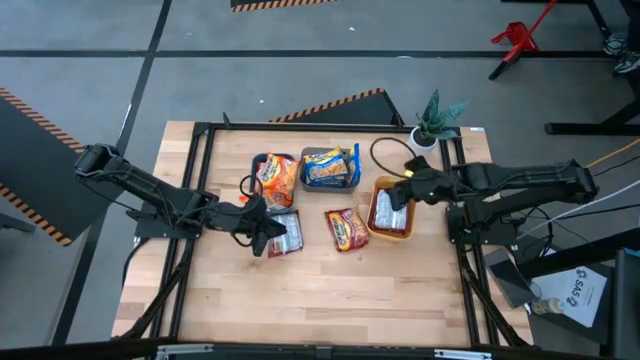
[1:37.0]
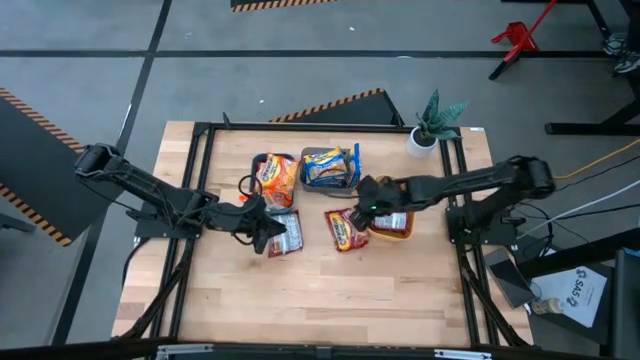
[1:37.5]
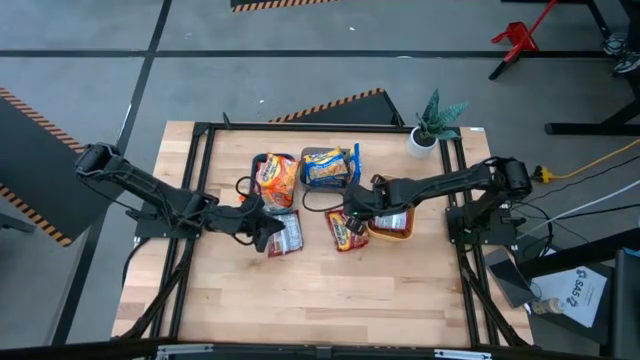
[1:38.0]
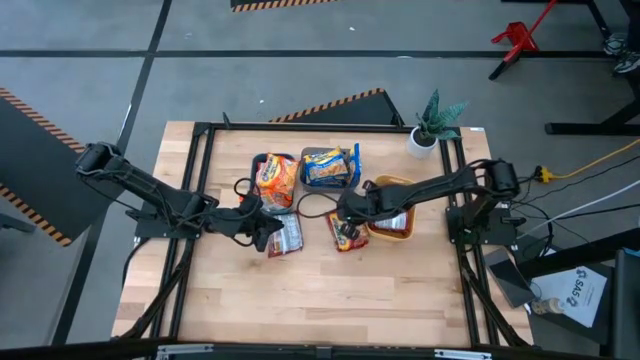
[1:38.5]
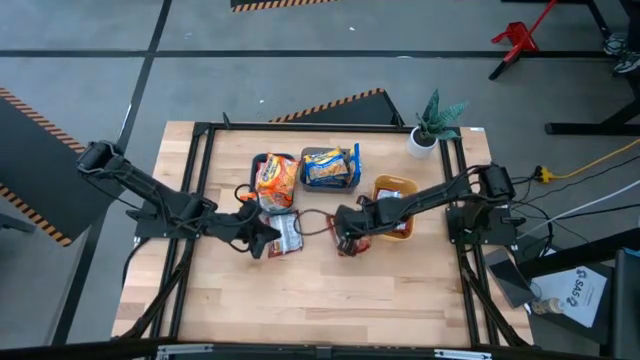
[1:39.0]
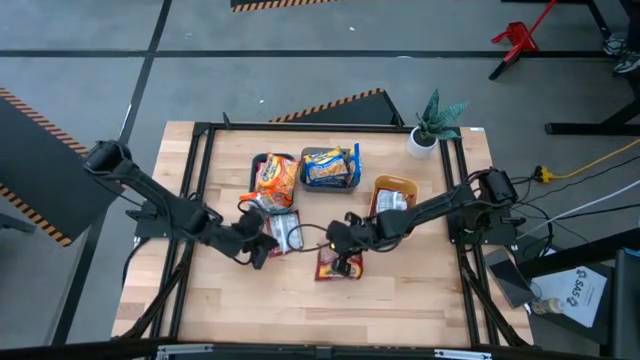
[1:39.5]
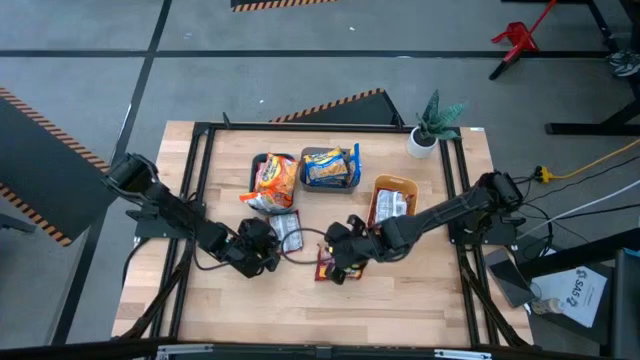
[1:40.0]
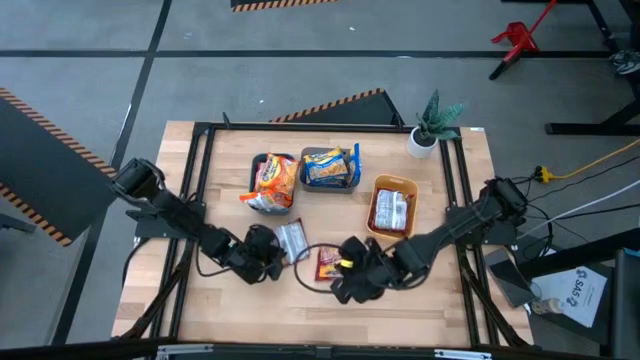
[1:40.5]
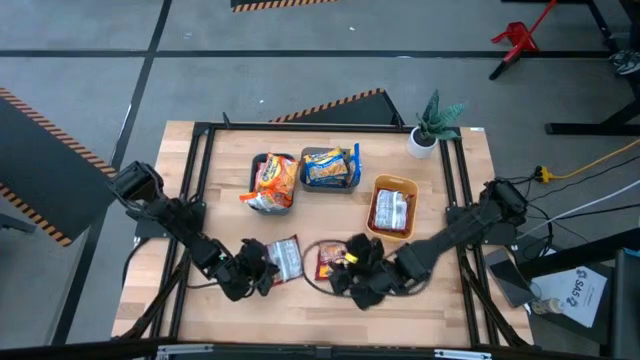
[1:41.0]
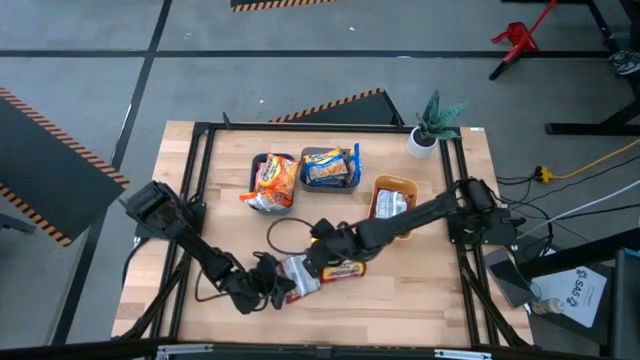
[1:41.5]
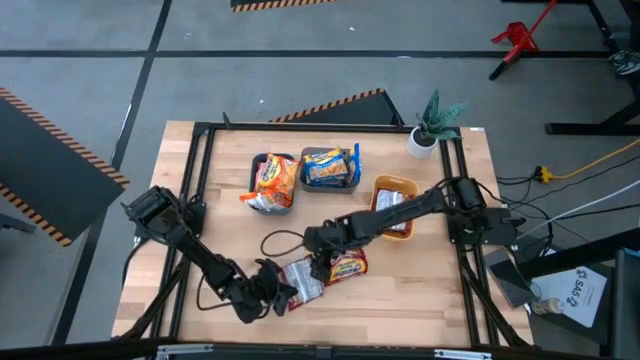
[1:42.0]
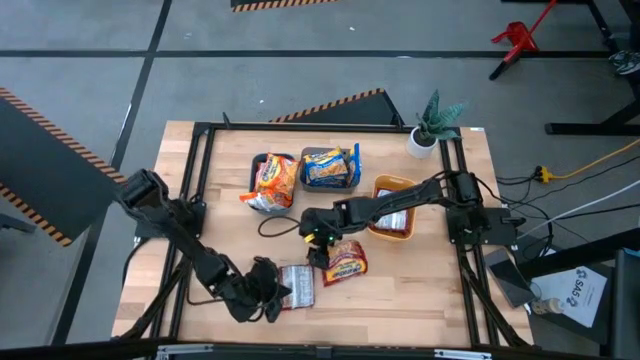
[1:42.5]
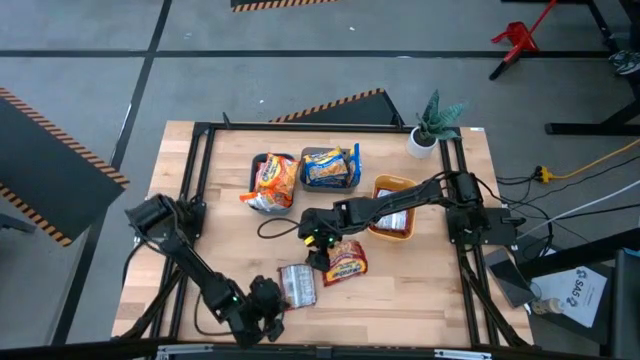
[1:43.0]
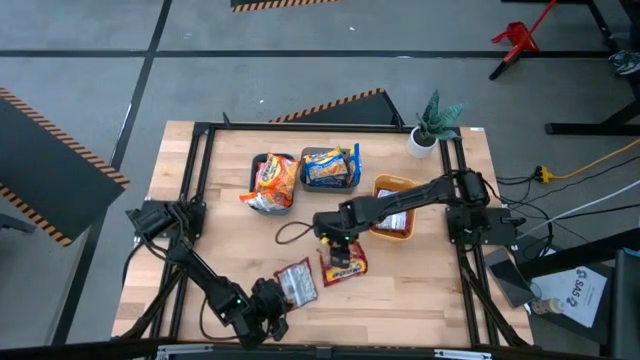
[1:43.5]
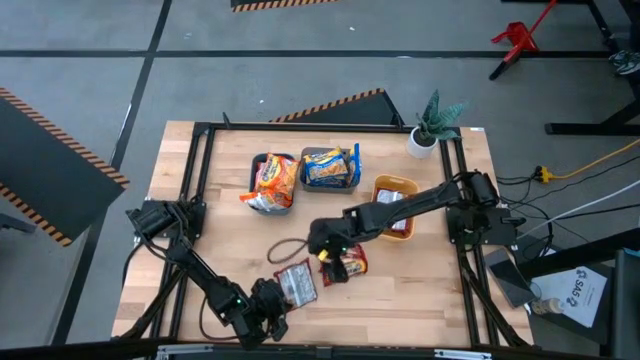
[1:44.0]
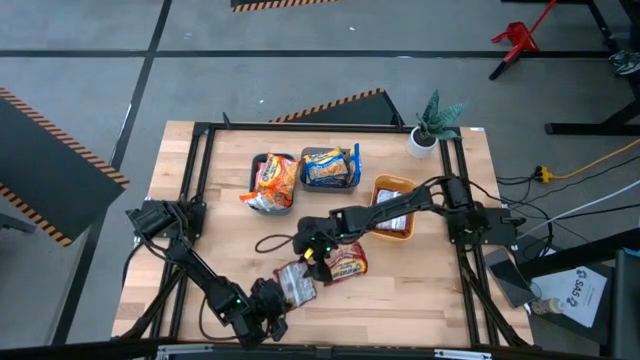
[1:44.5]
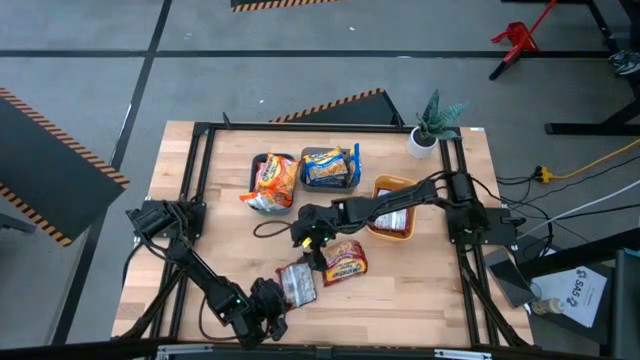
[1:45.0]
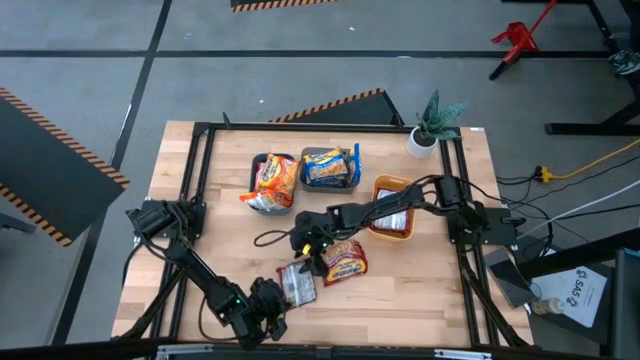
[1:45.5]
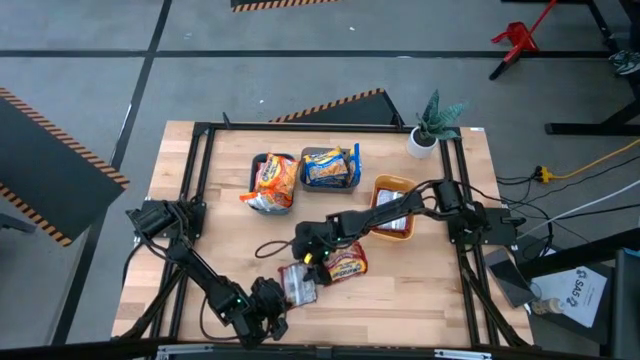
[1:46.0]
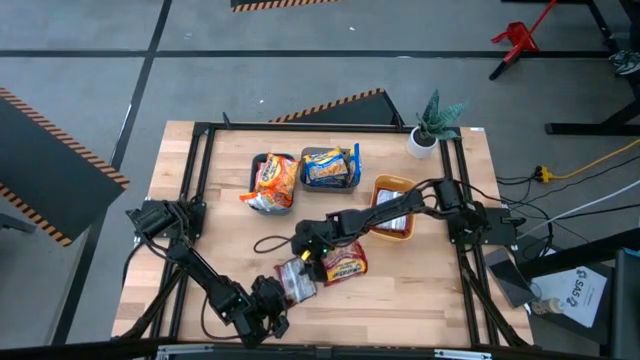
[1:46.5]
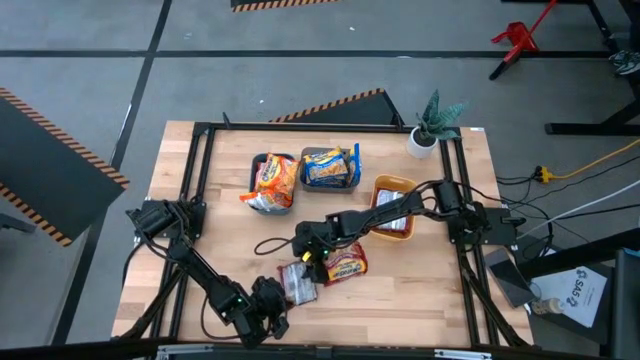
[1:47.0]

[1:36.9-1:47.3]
Task: Sort Maruchan noodles
Put the red noodle pack into the yellow bin

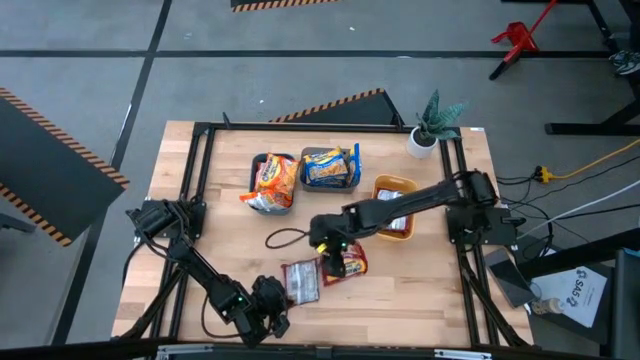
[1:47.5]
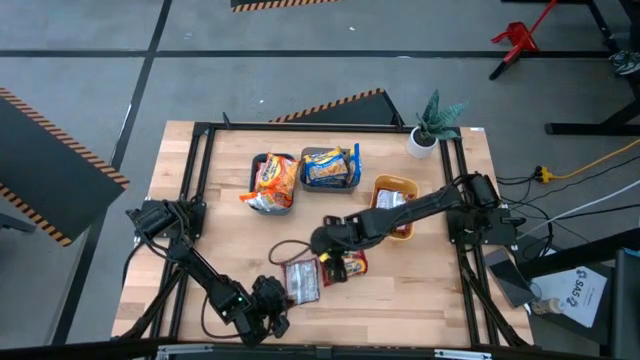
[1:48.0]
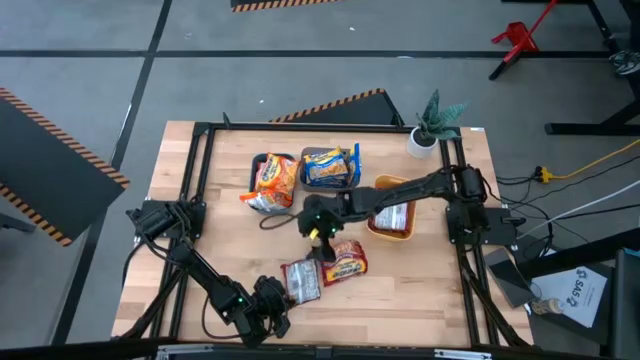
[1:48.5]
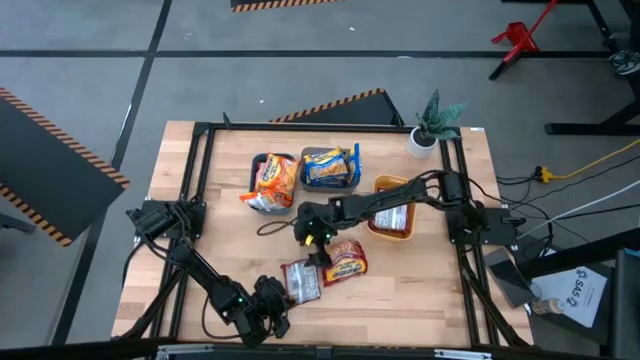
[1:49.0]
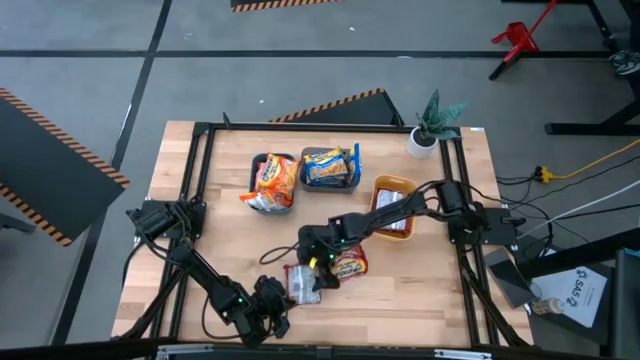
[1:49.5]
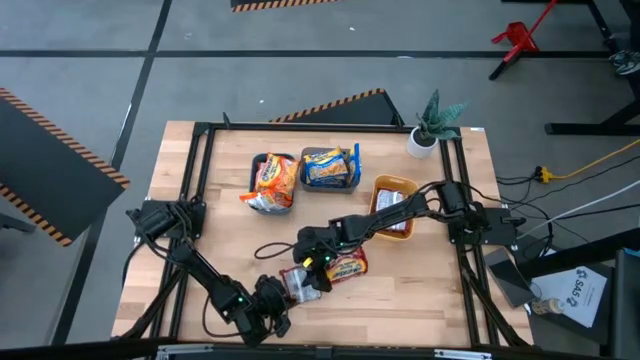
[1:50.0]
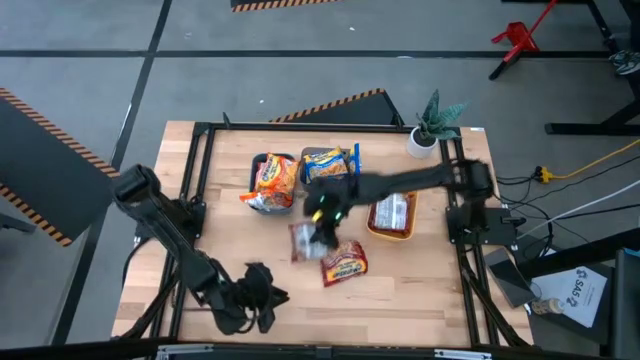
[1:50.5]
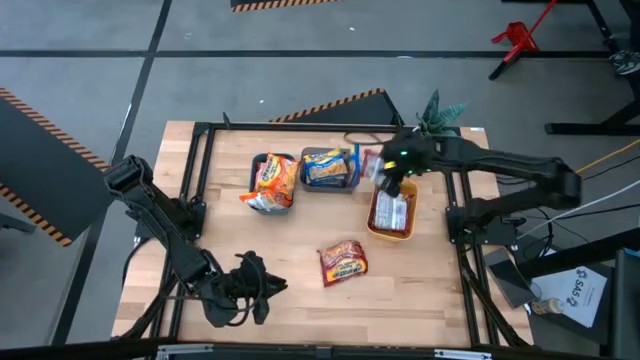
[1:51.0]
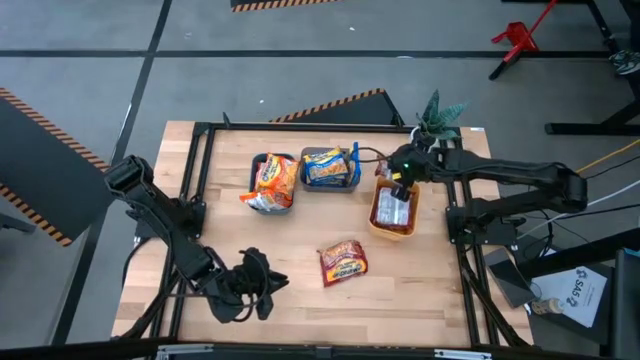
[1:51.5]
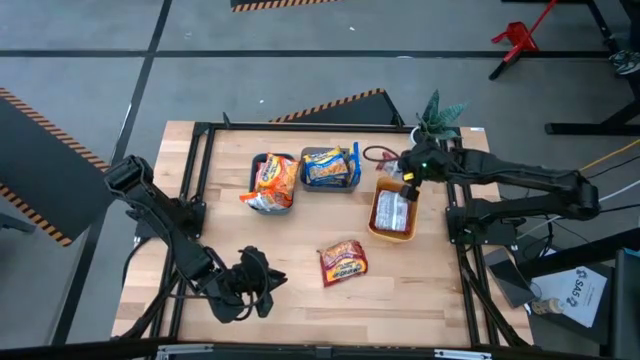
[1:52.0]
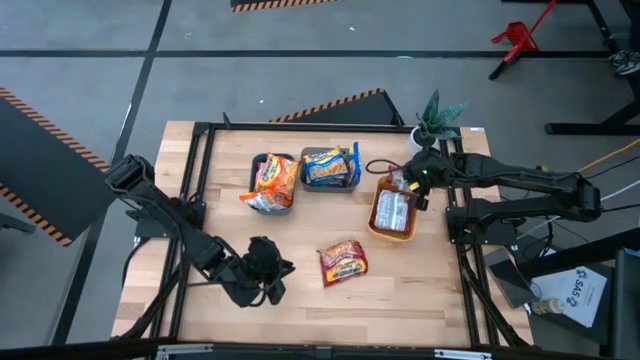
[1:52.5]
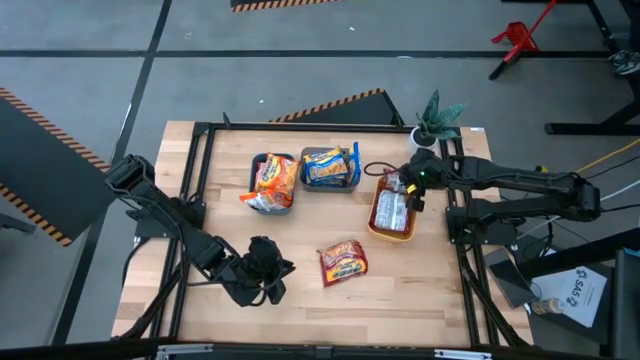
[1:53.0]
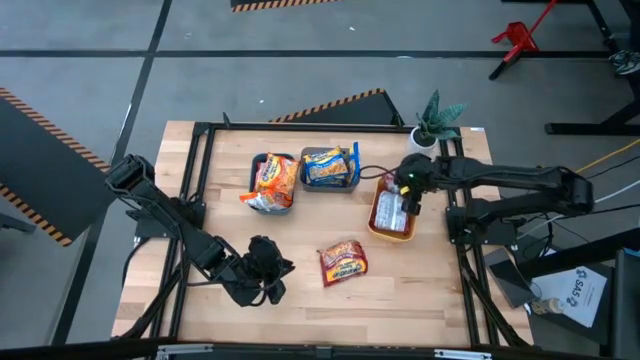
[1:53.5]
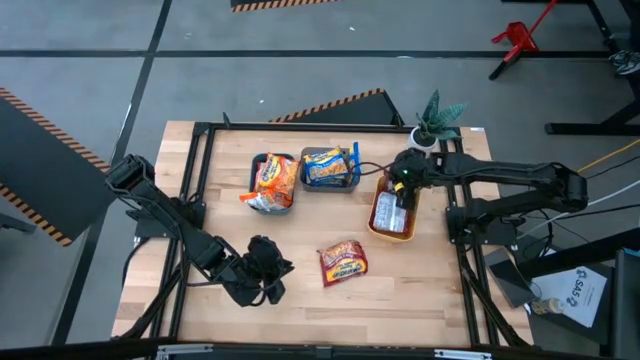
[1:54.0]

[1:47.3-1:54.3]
Put the red noodle pack into the yellow bin

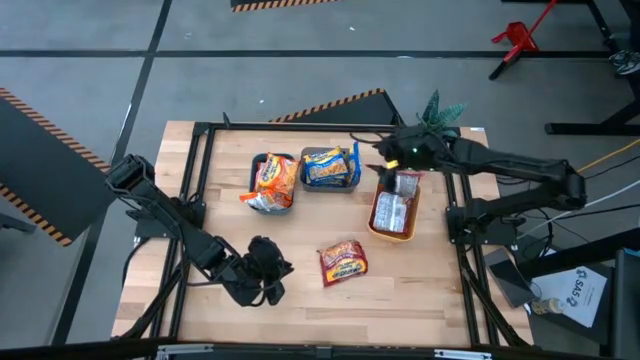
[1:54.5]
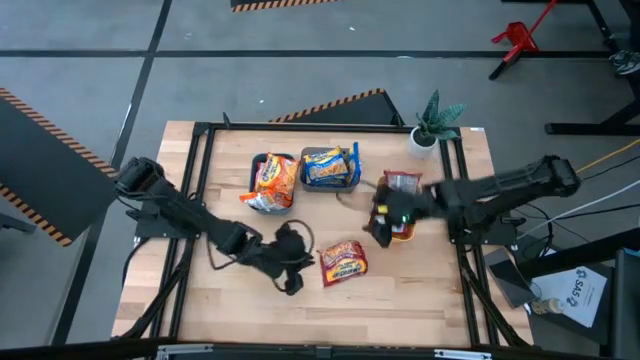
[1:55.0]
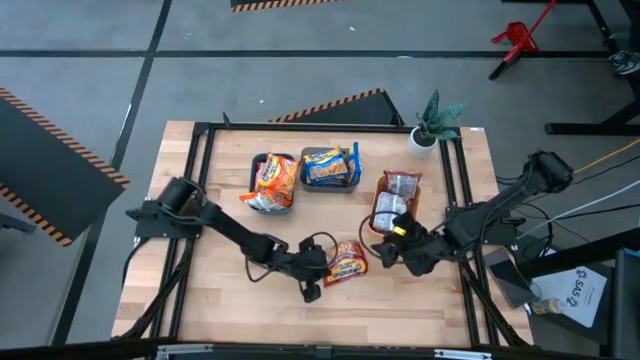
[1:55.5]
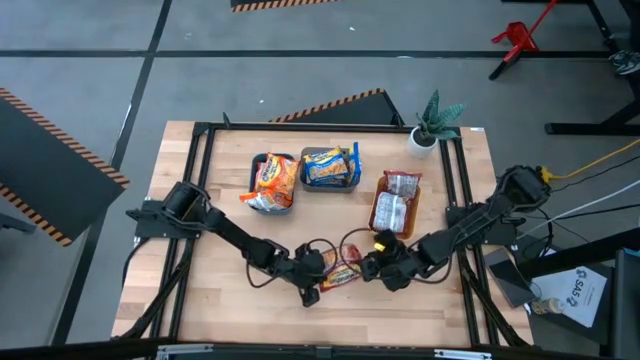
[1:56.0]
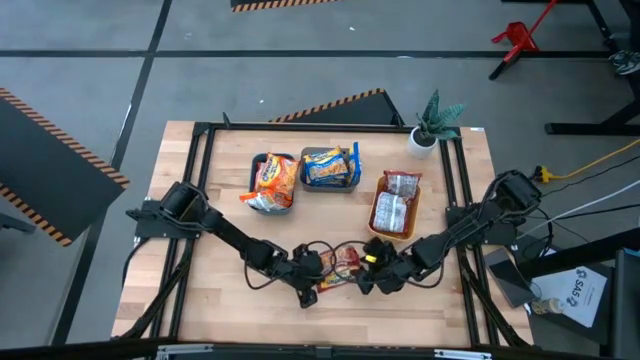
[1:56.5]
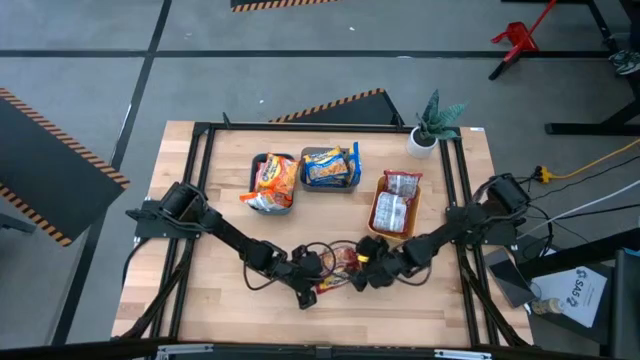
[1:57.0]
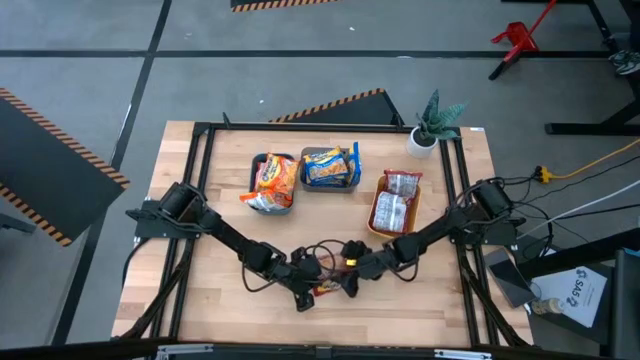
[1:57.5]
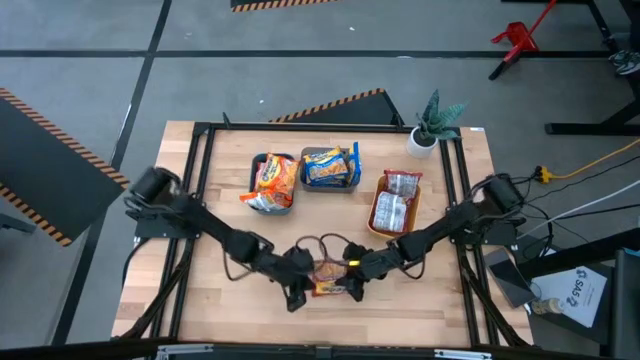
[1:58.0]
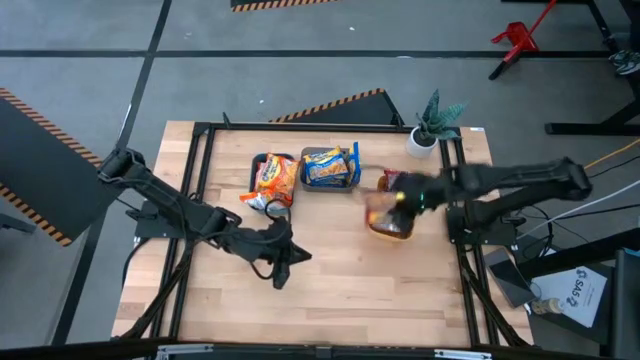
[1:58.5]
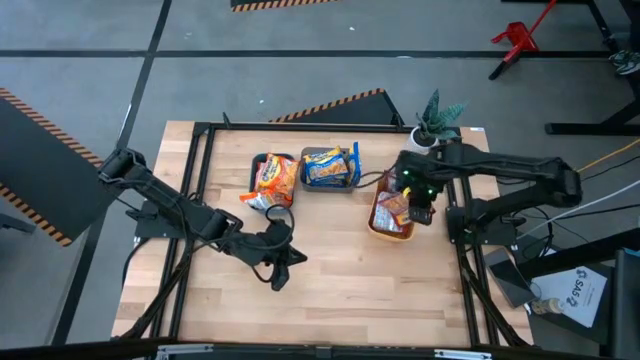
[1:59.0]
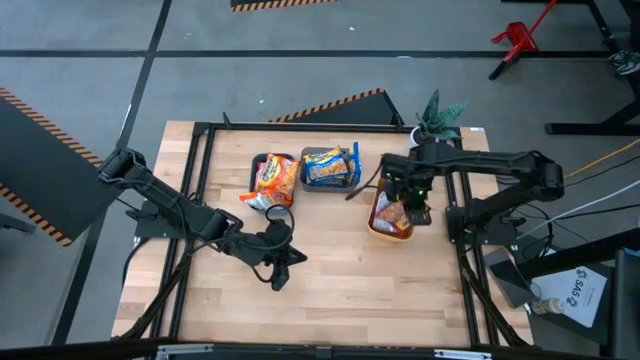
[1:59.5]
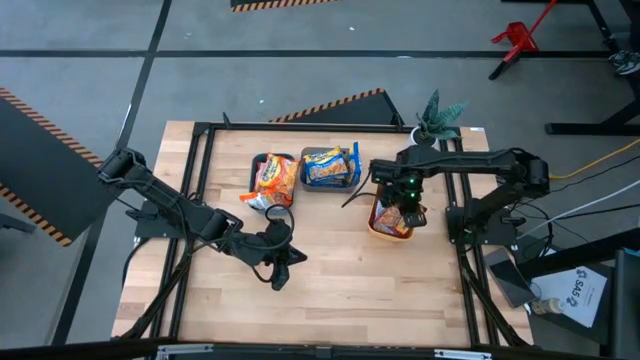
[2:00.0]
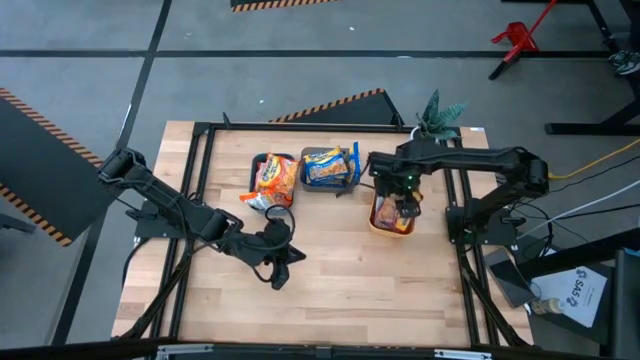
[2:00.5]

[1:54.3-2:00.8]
Put the red noodle pack into the yellow bin
